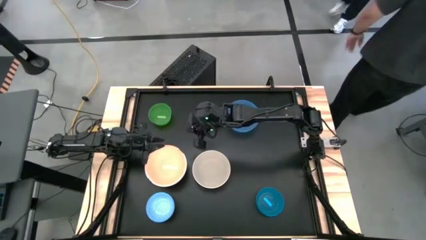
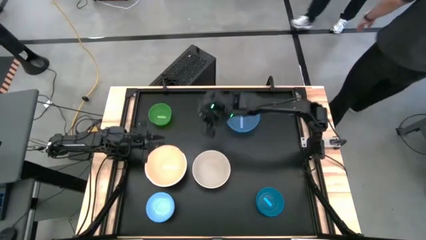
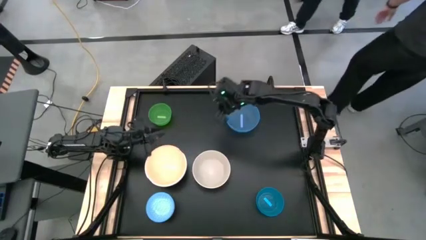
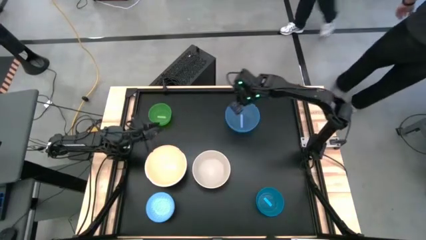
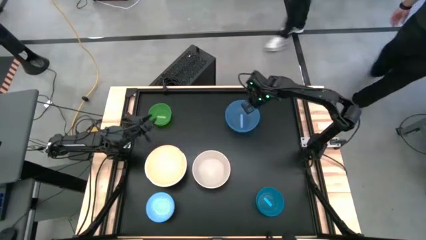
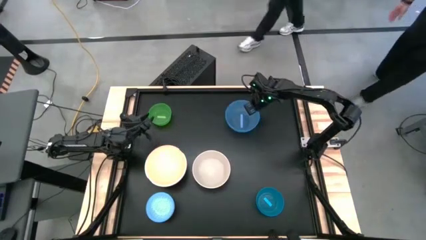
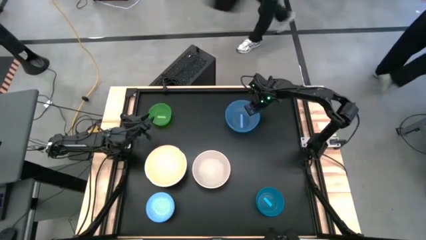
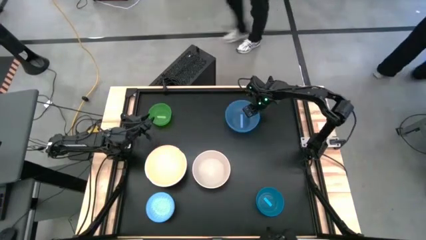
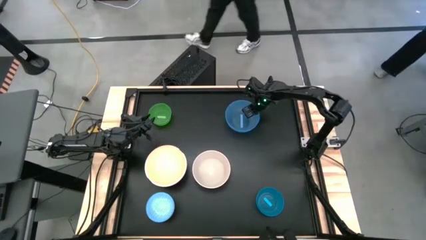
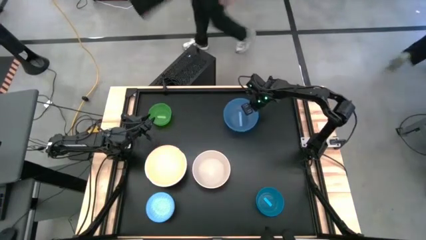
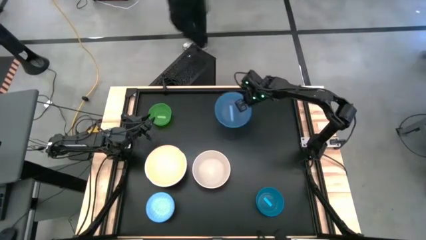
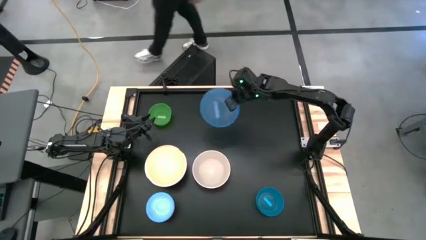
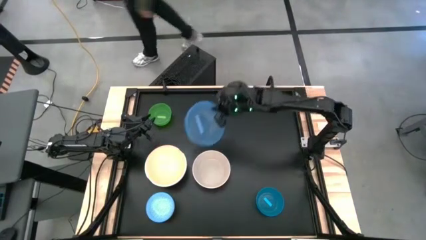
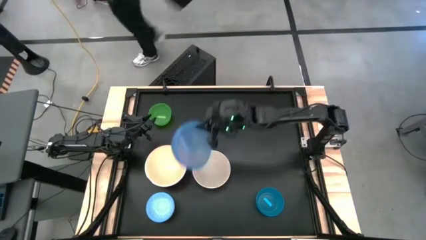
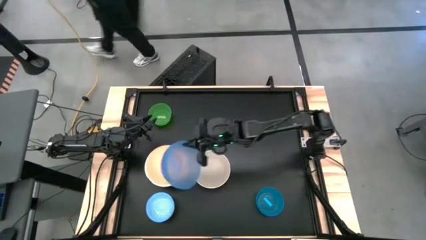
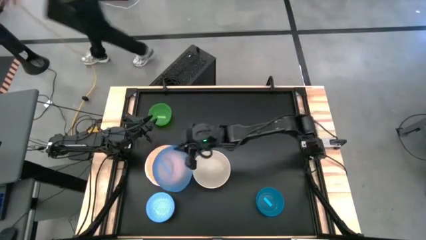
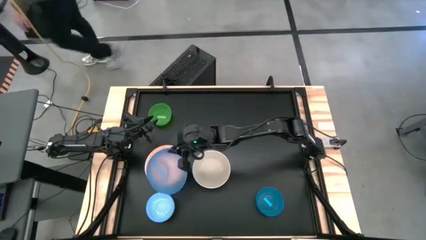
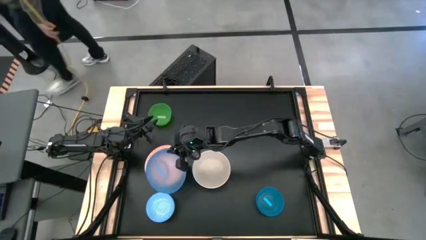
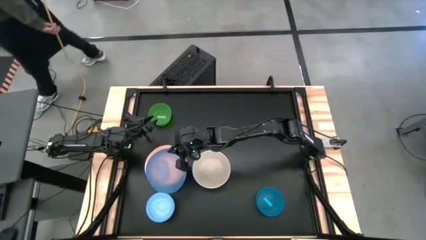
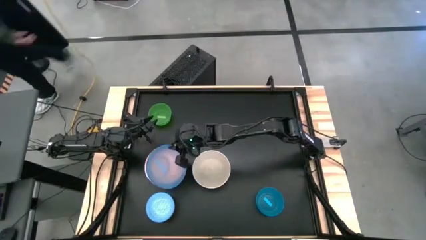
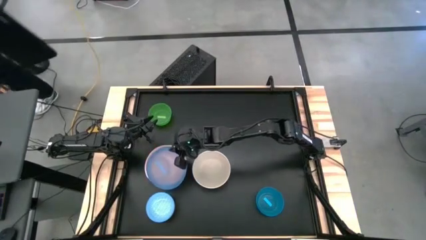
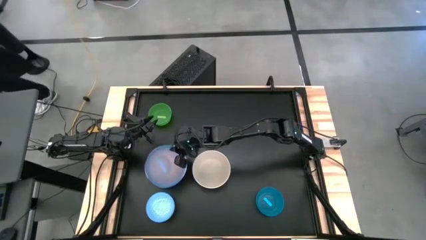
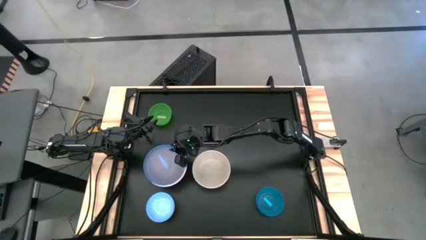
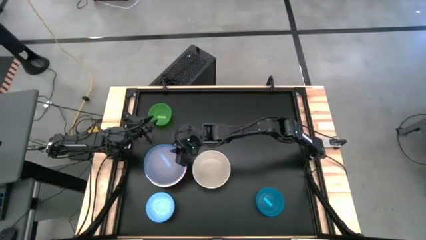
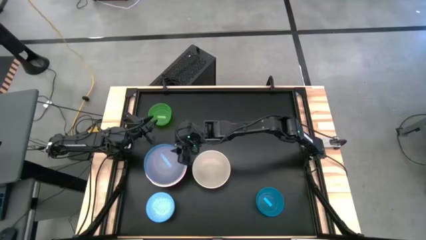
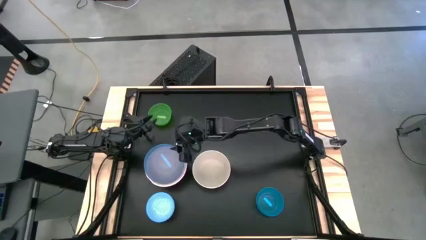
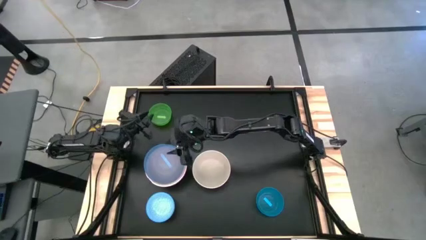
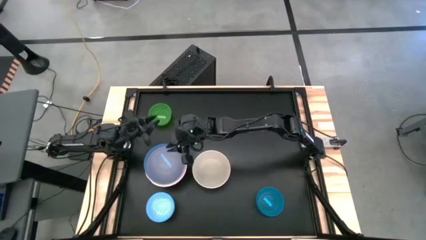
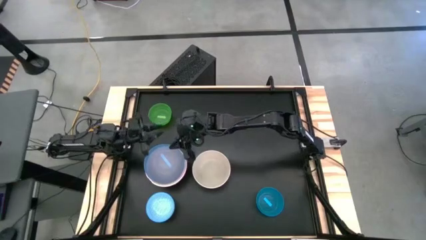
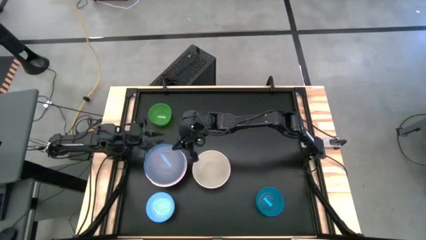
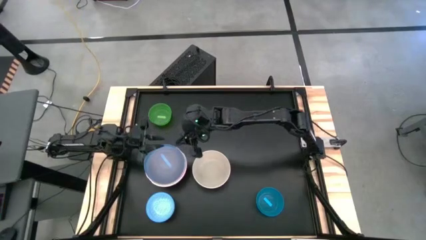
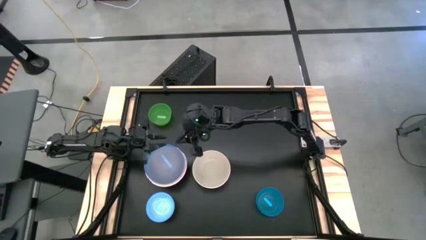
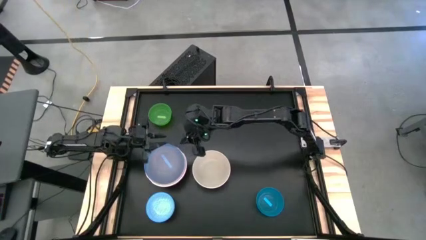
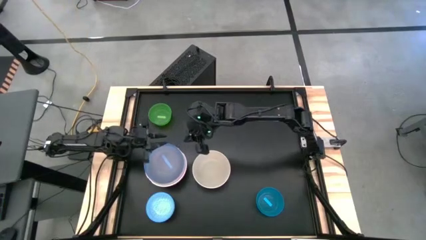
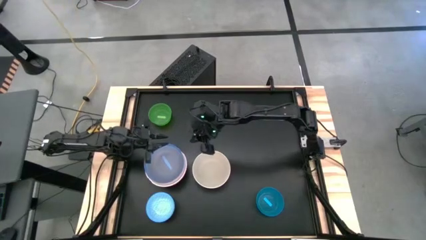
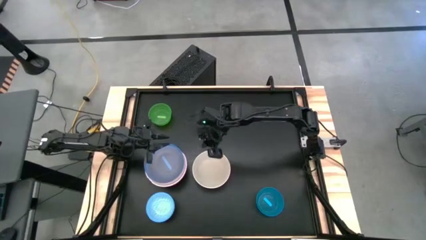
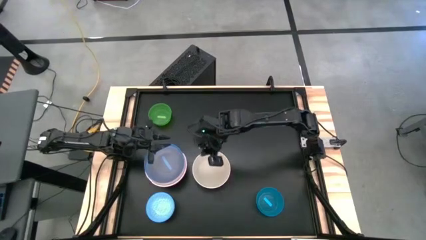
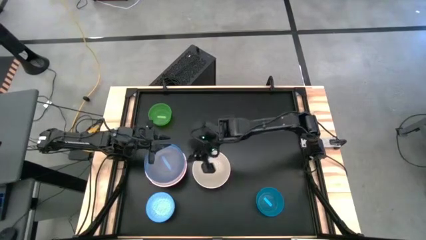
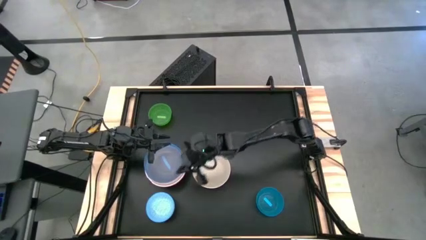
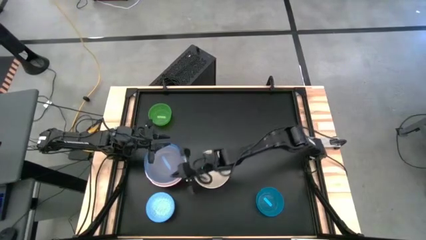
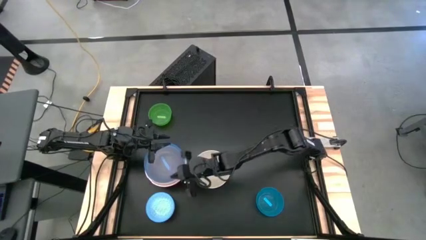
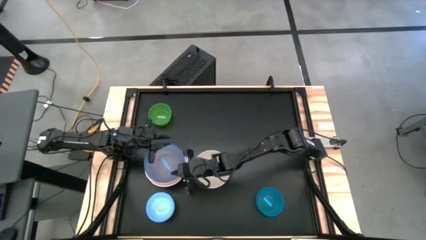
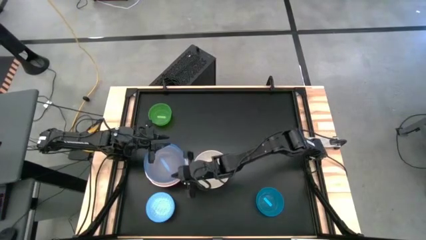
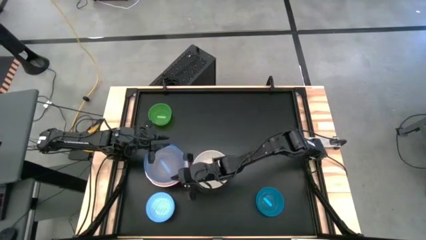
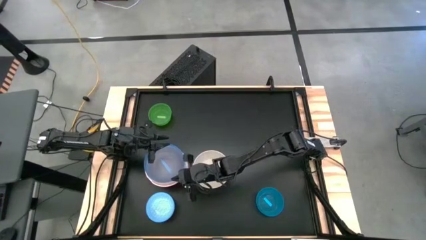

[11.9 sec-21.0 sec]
Stack the blue bowl on top of the orange bowl

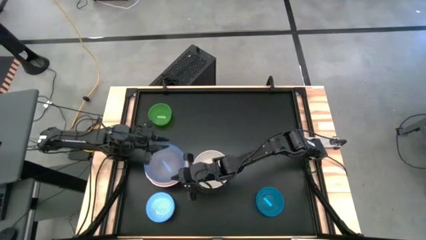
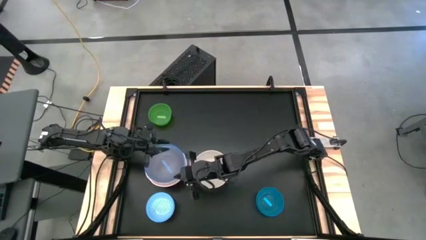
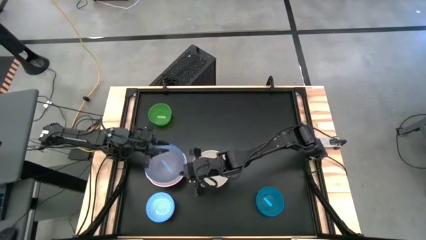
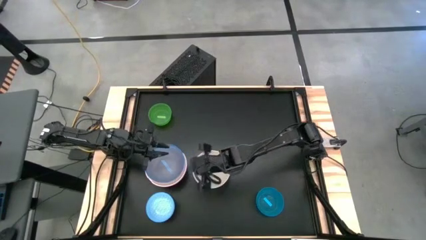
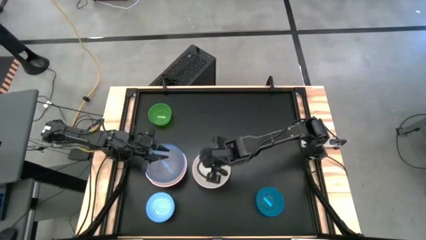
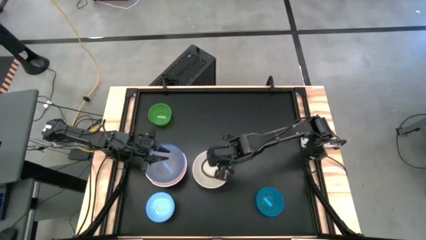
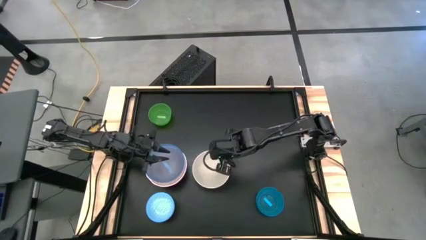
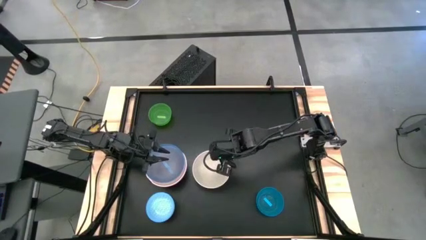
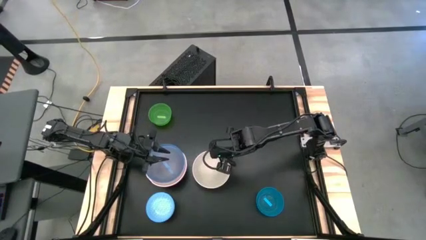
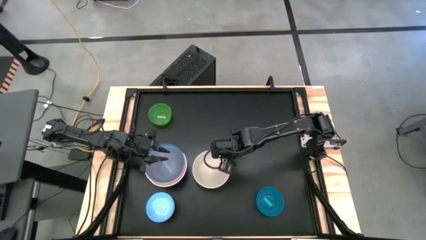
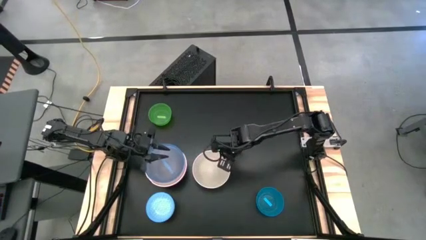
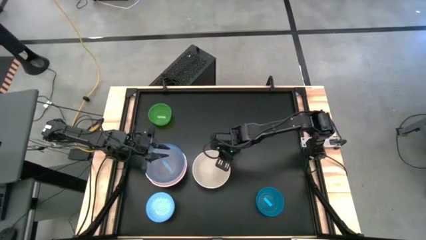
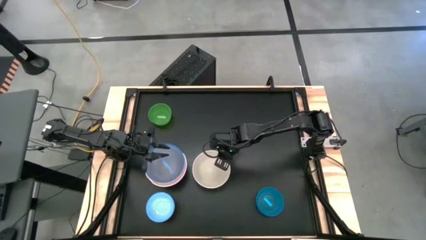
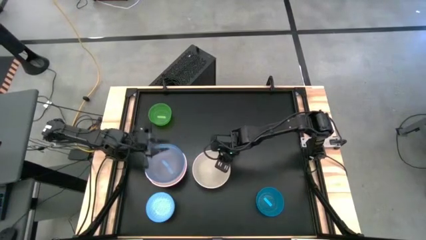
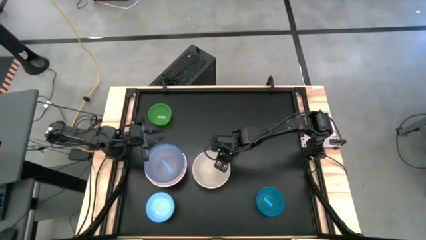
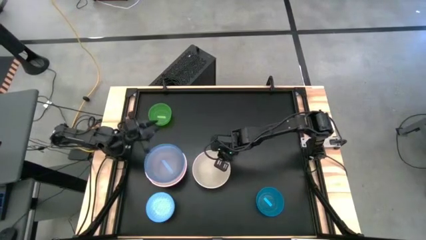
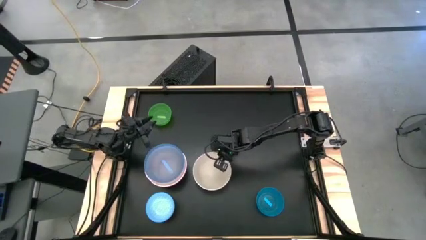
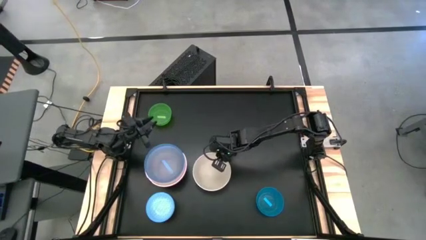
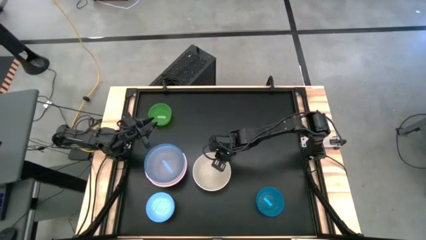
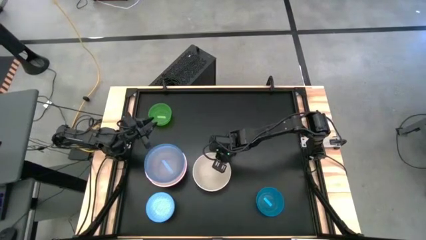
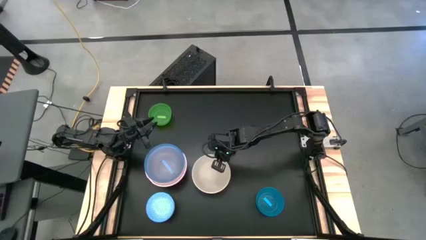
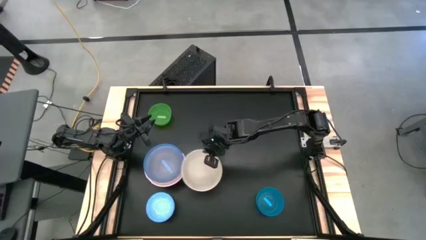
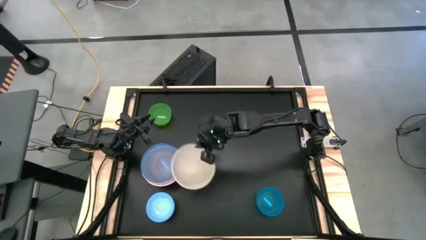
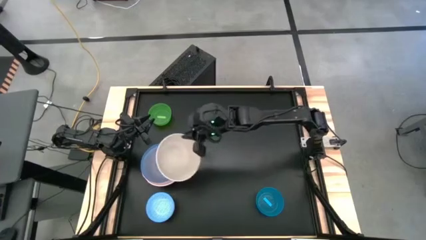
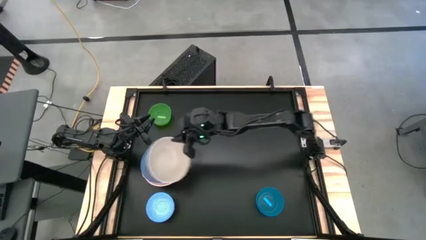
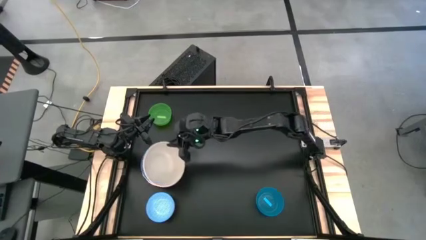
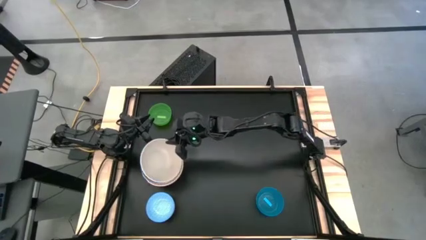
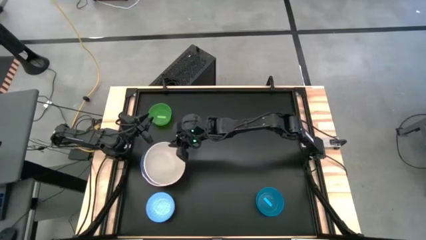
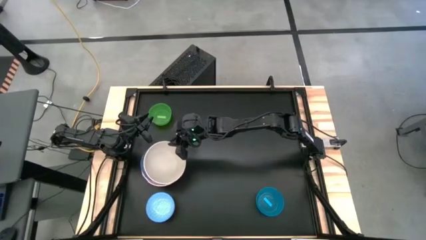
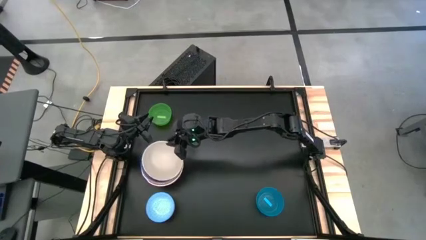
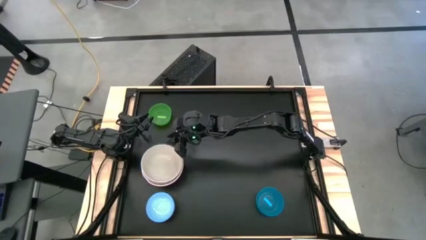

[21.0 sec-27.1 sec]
Stack the gray bowl on top of the top blue bowl
